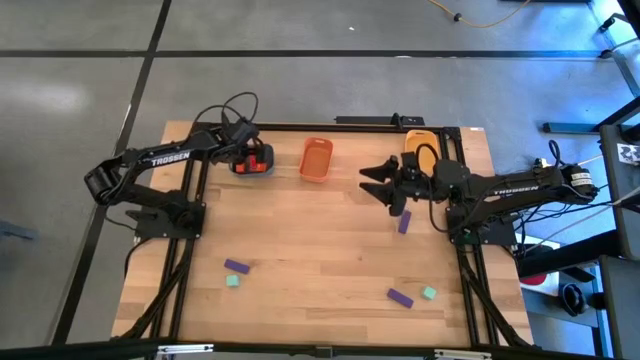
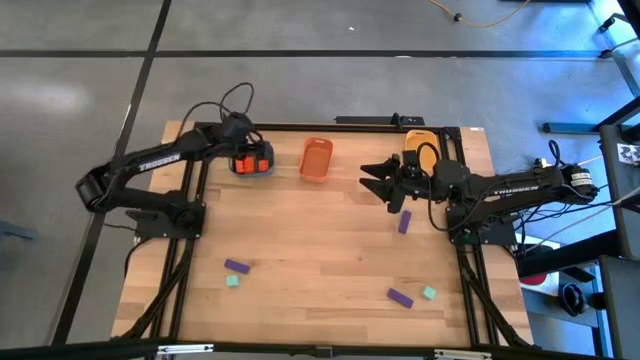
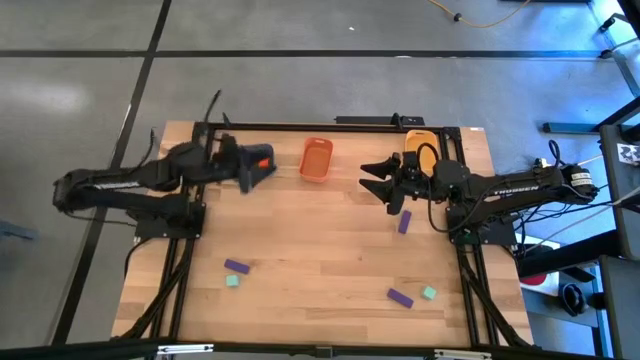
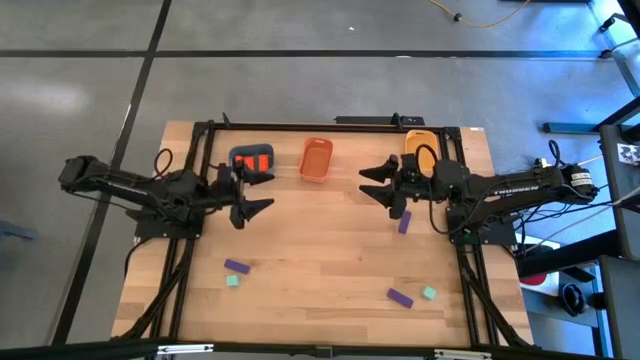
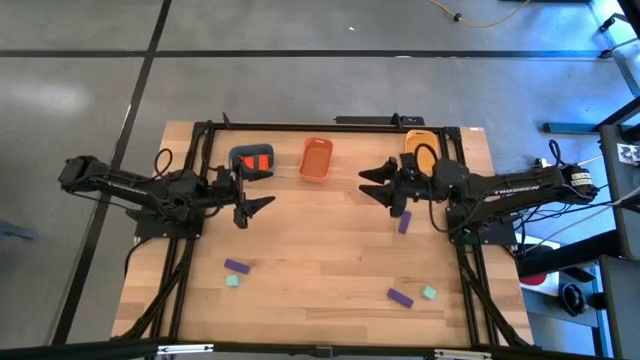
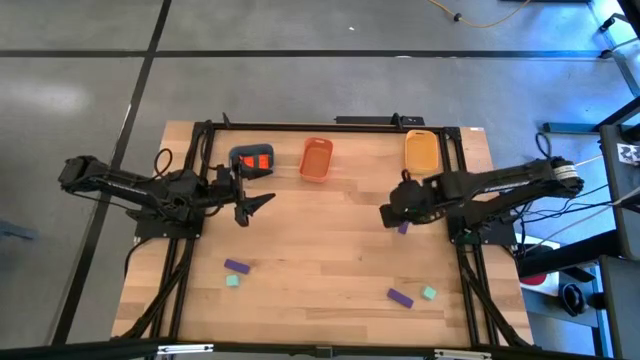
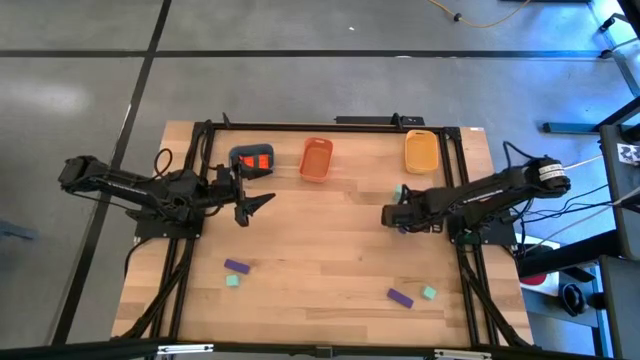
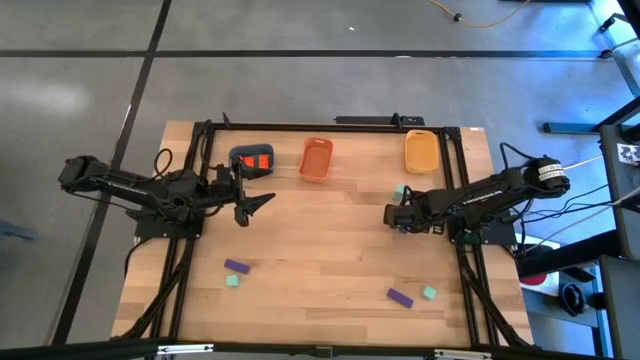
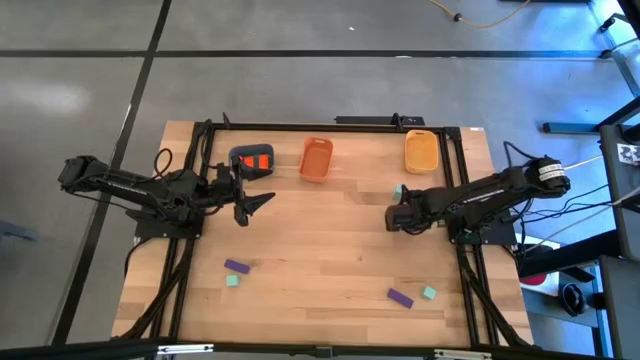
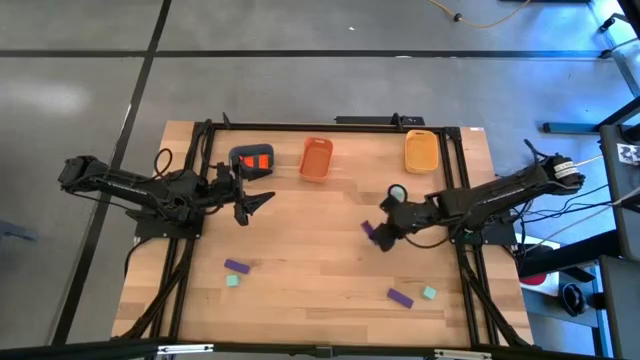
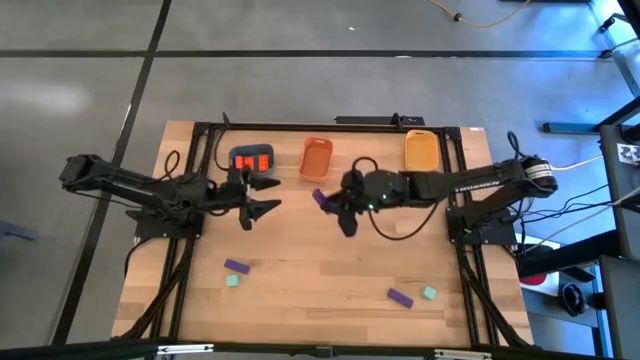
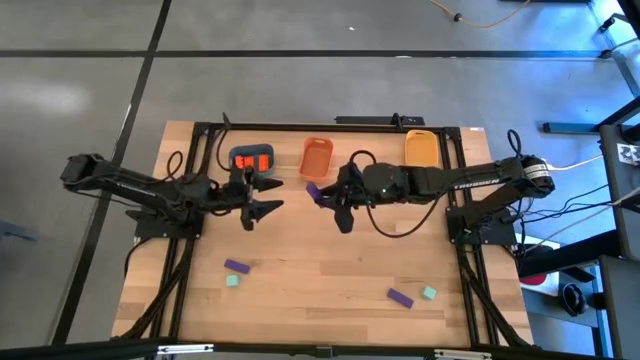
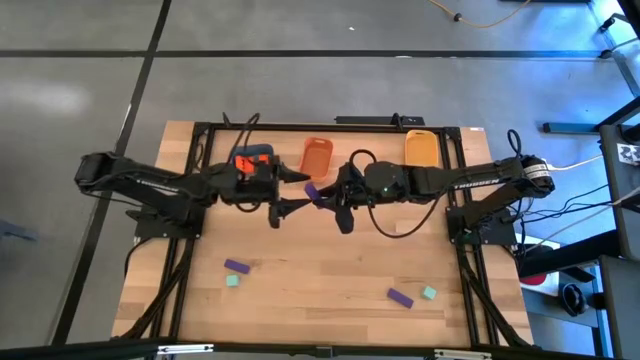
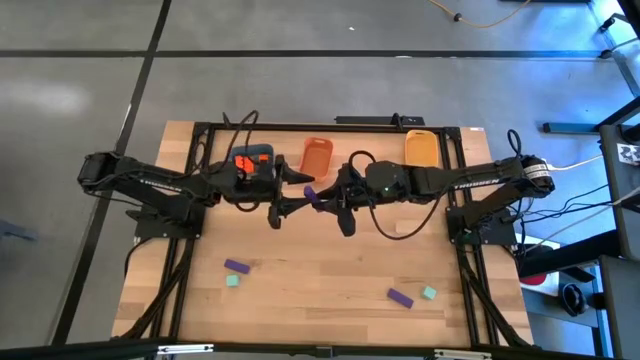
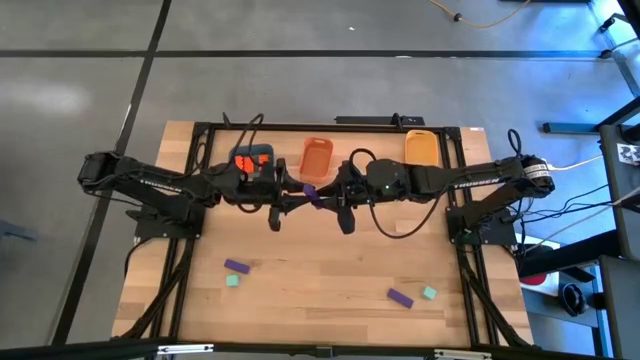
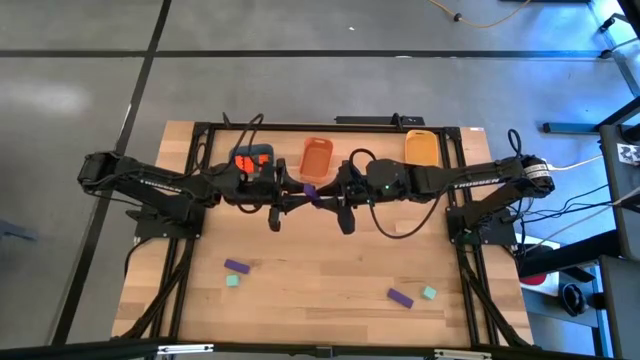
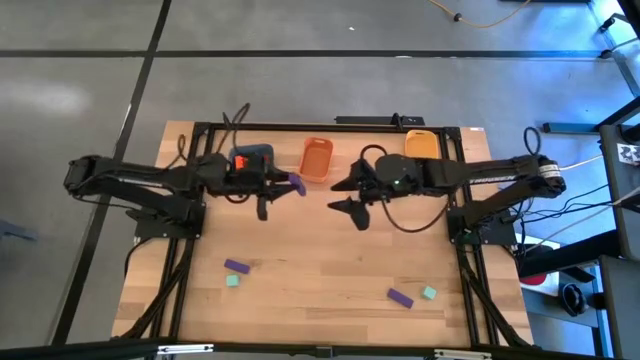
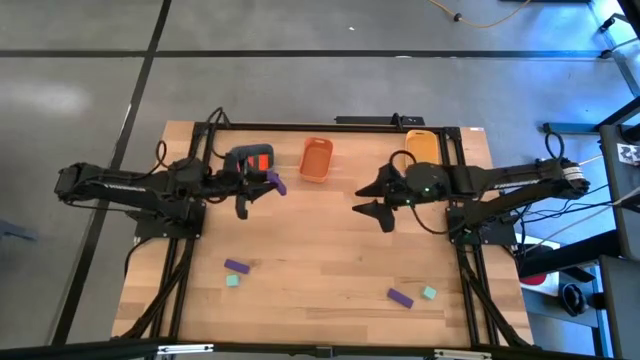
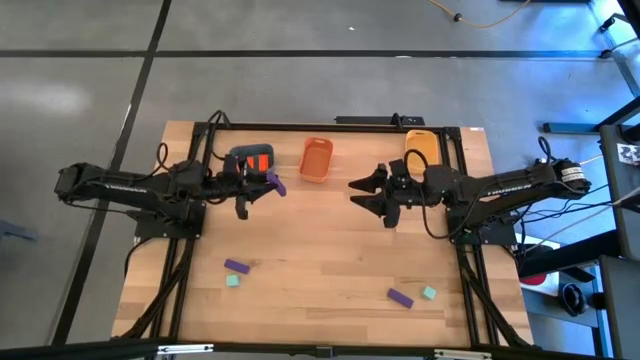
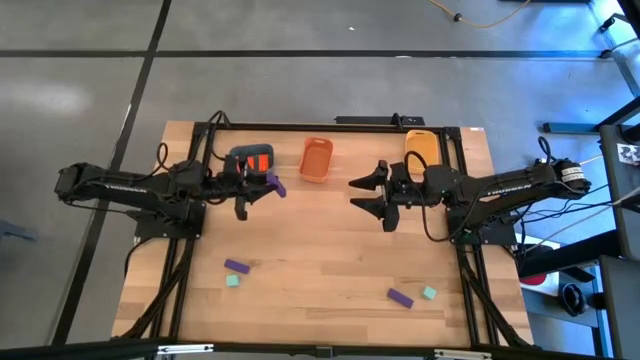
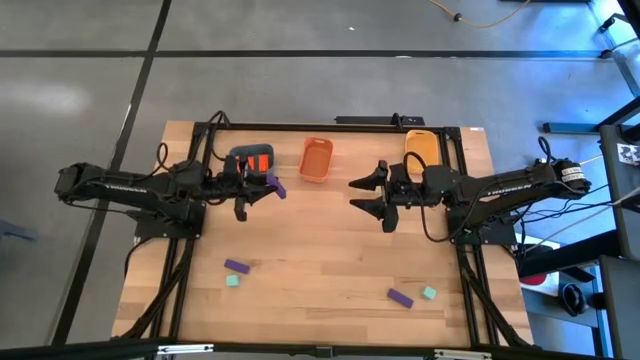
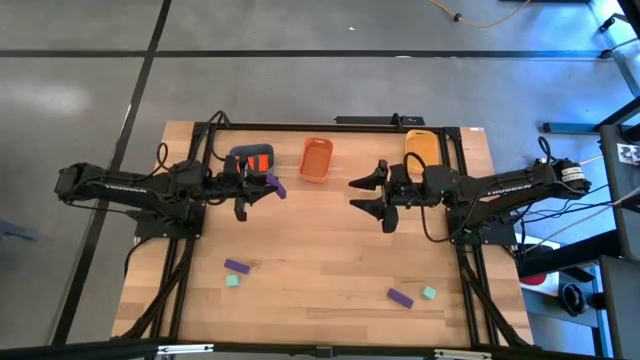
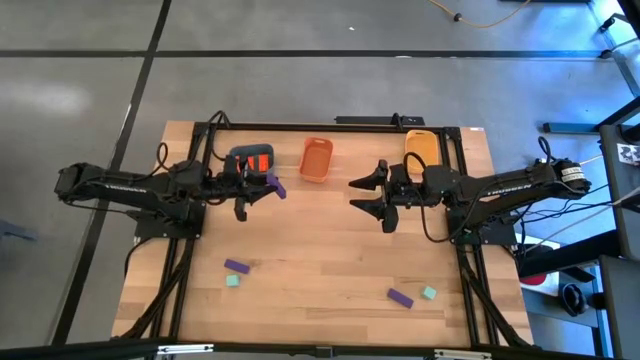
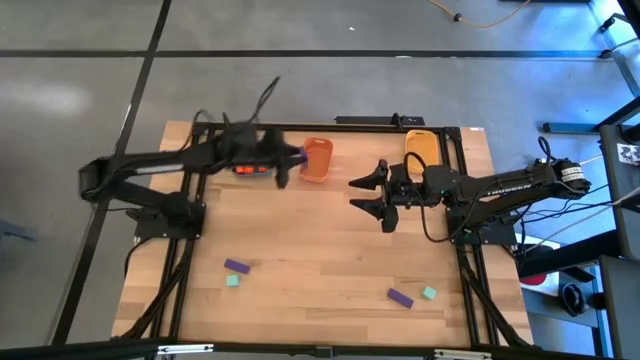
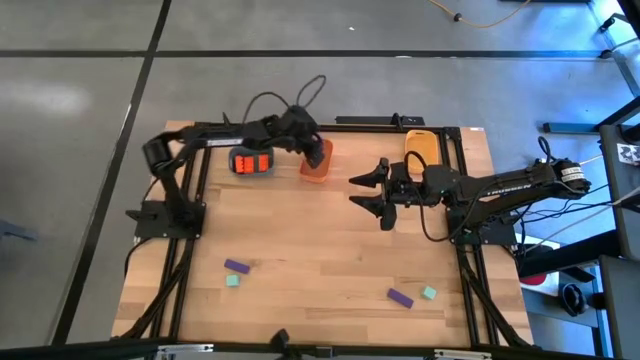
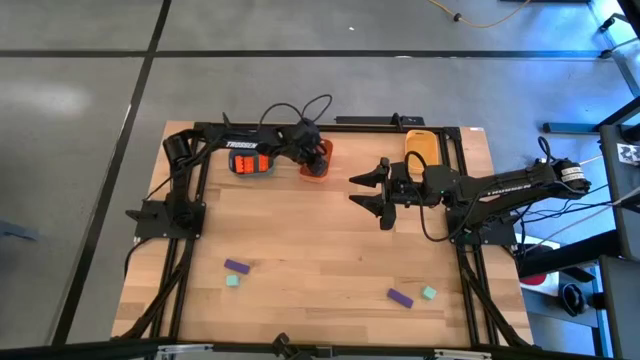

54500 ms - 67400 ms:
Task: Sort & place blocks by color
Put the top right violet block into the orange bin

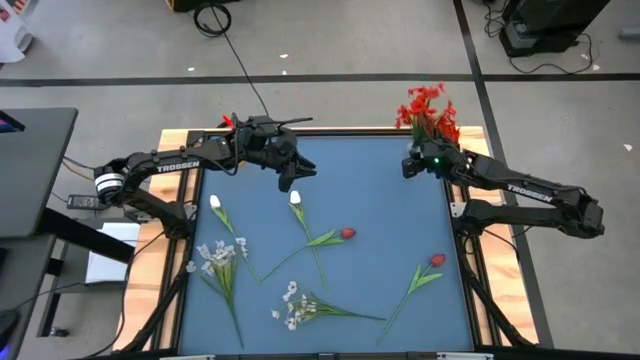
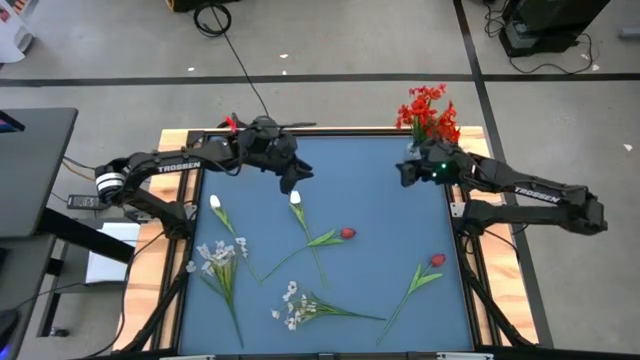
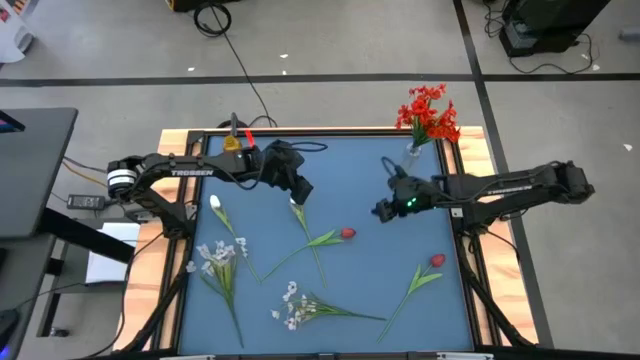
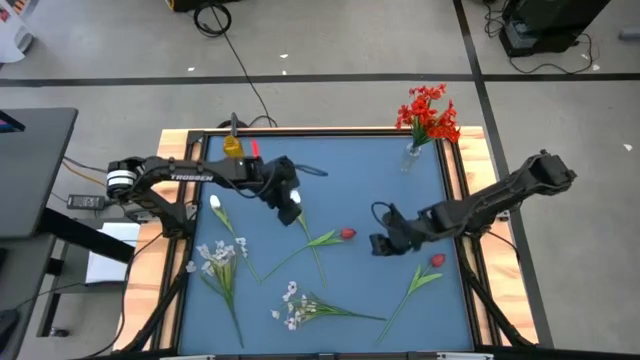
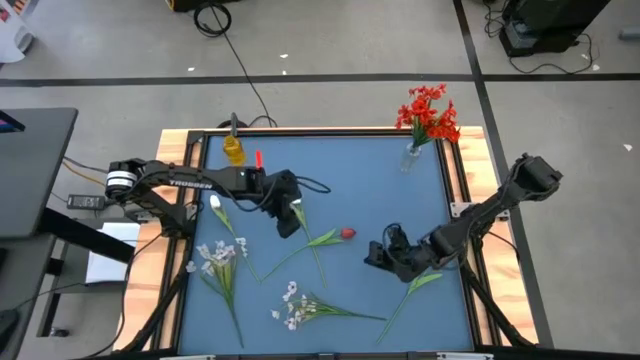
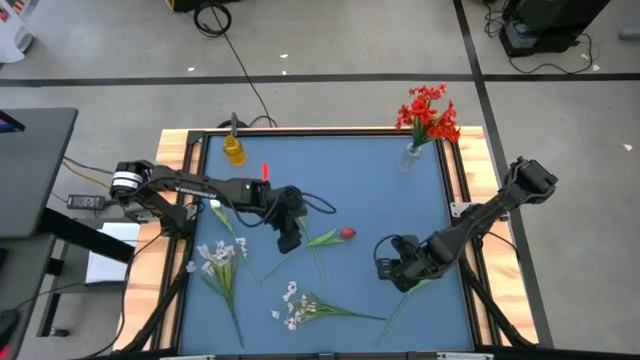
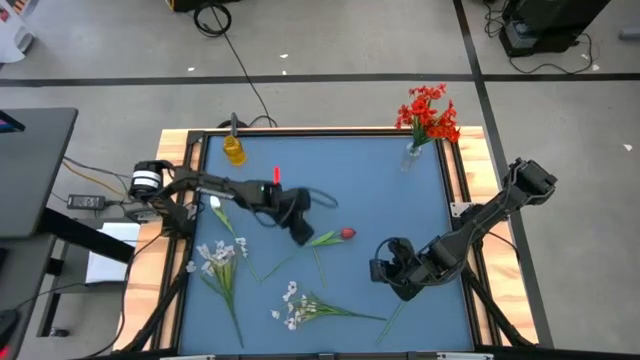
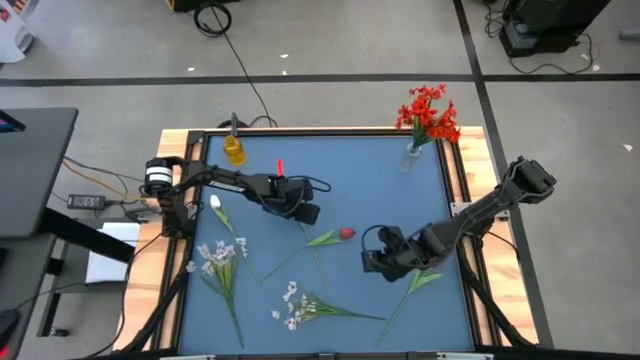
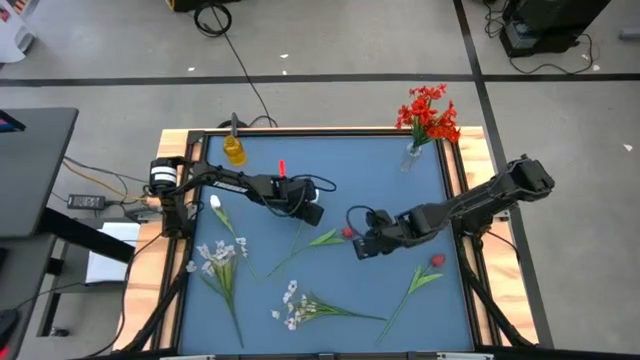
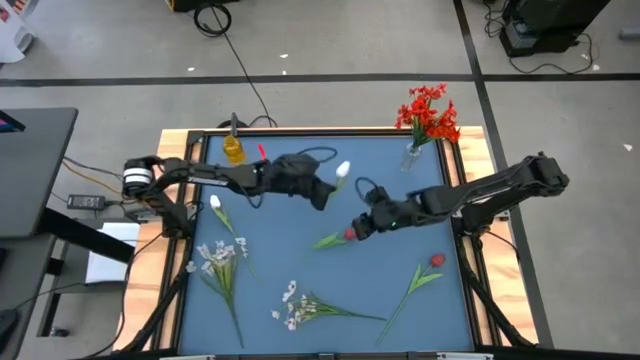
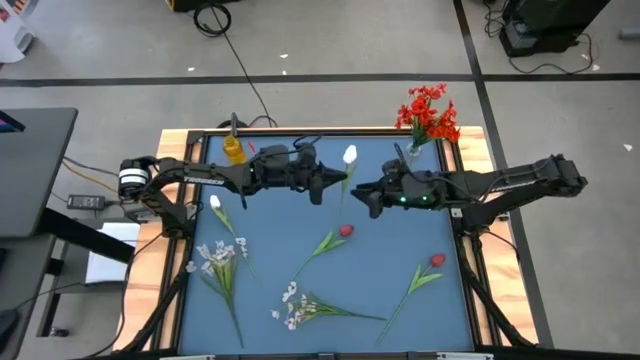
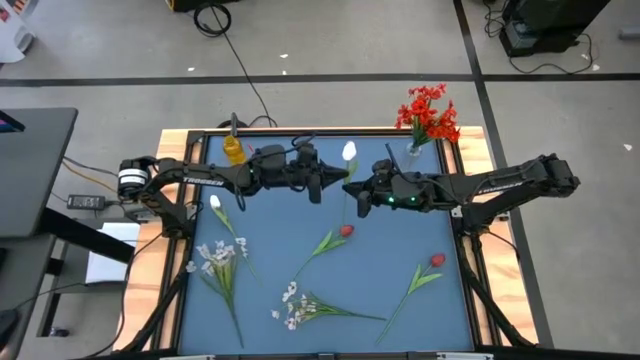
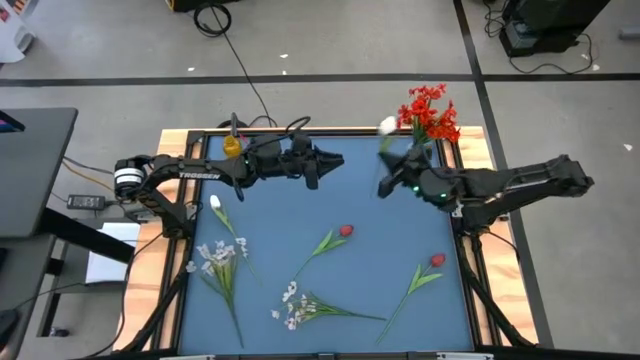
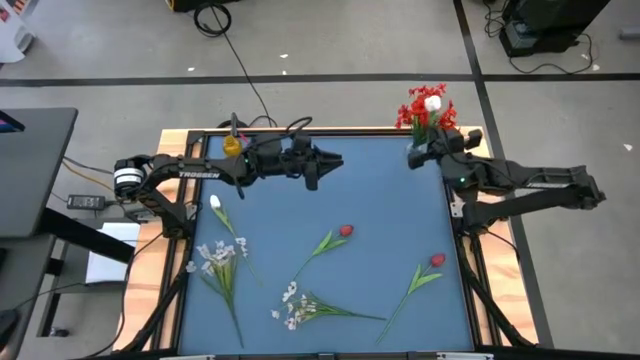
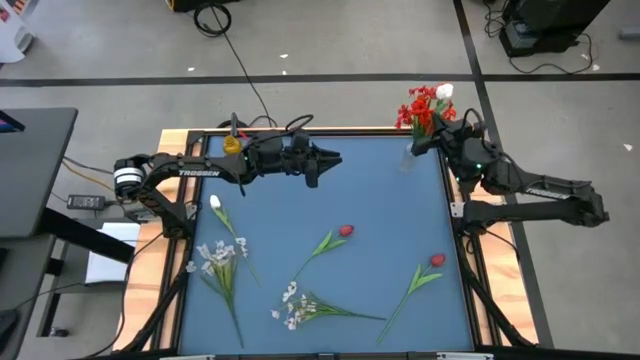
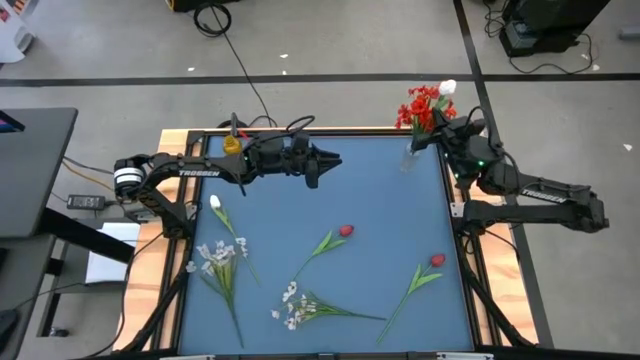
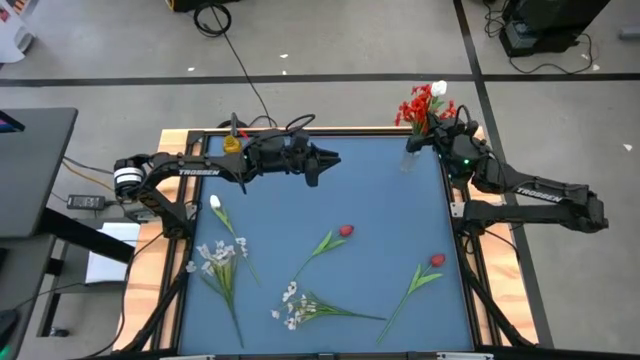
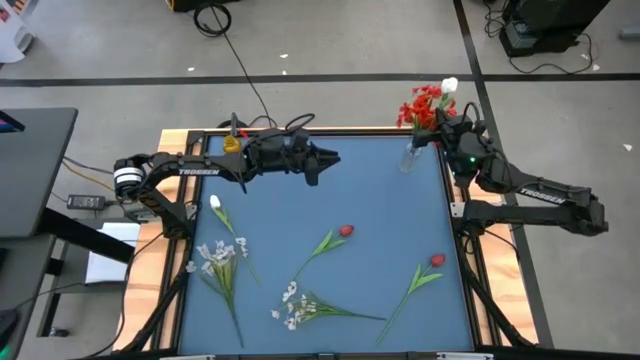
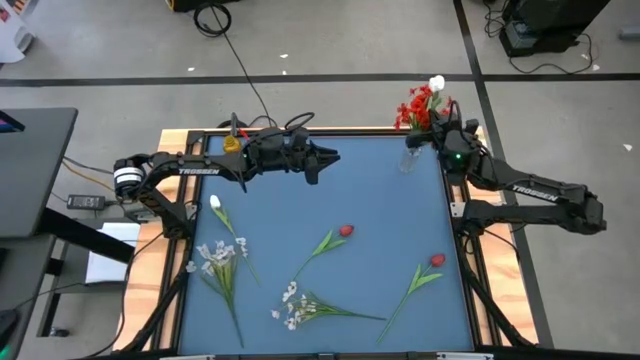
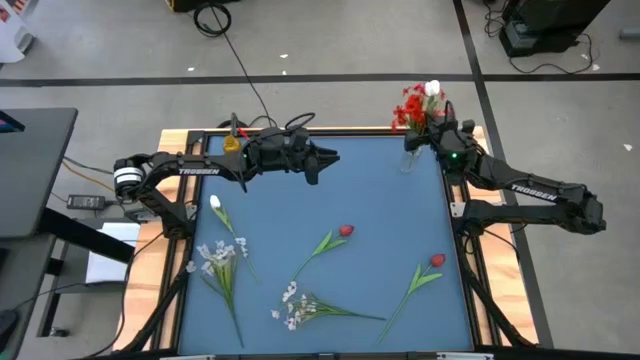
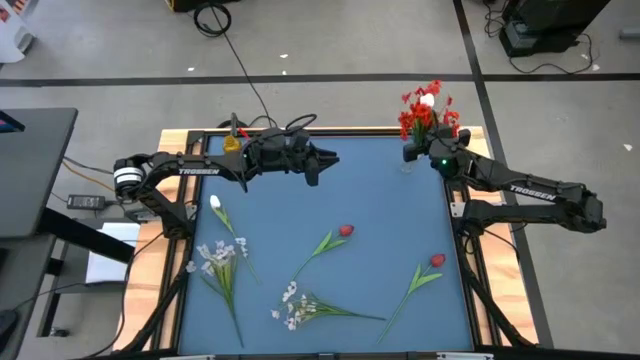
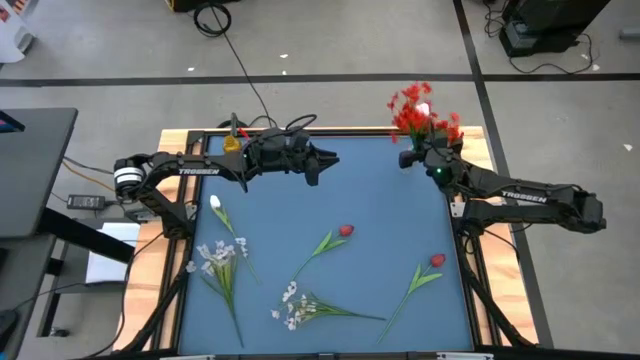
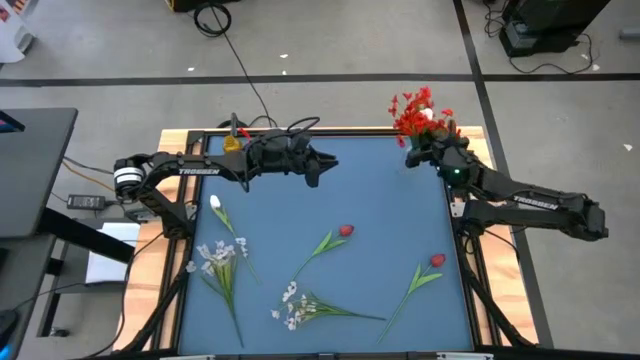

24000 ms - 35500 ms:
Task: Sort flowers into vase by color
Put the right white tulip into the transparent vase
